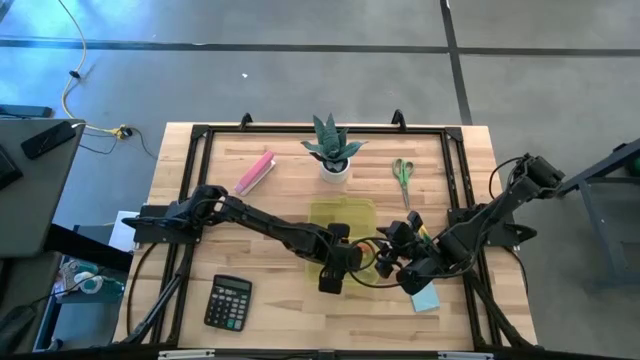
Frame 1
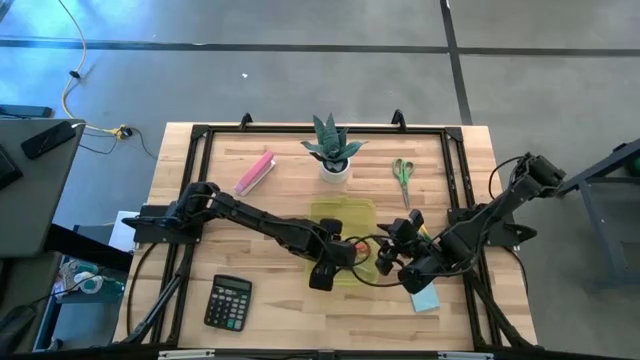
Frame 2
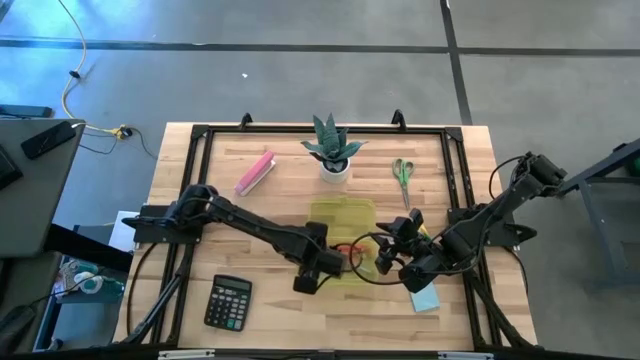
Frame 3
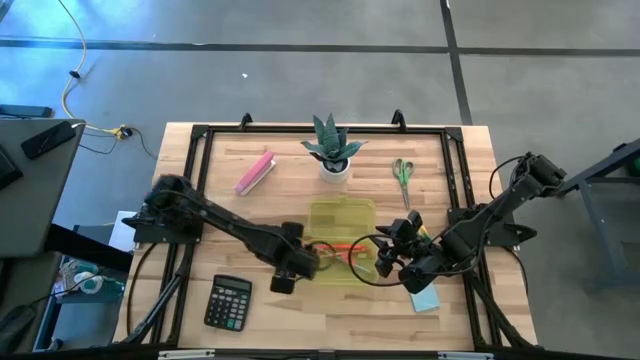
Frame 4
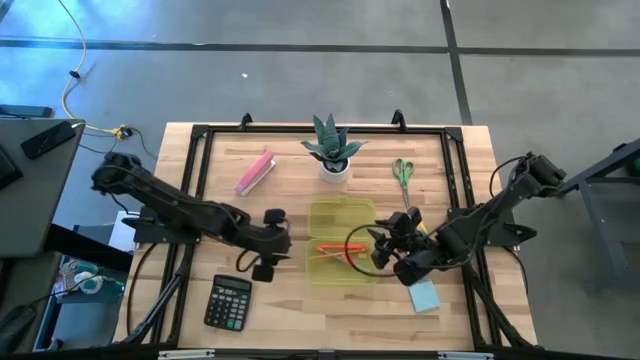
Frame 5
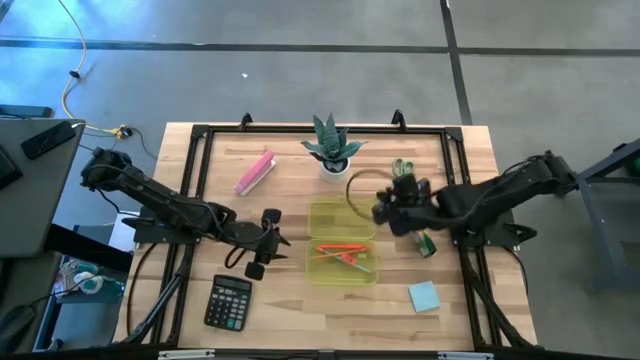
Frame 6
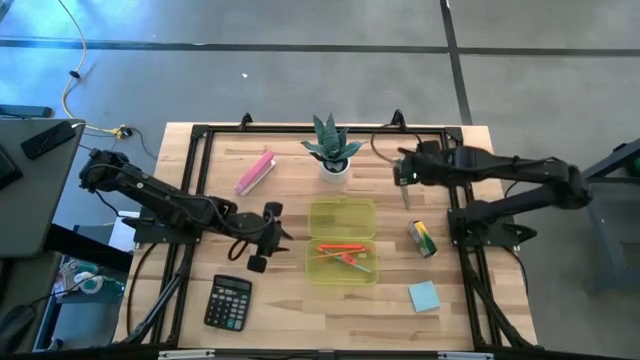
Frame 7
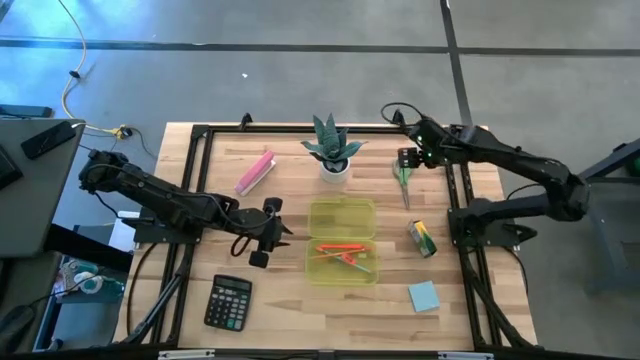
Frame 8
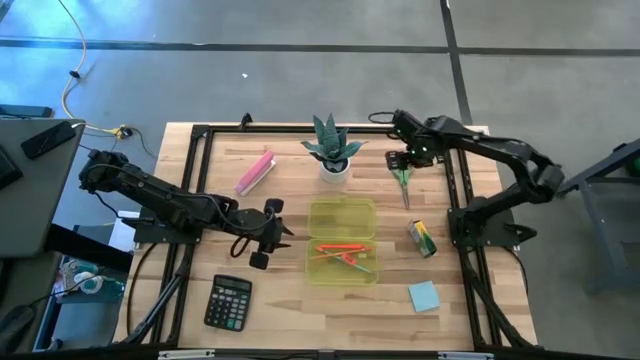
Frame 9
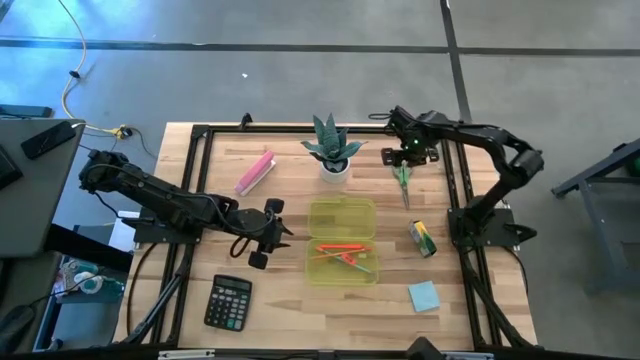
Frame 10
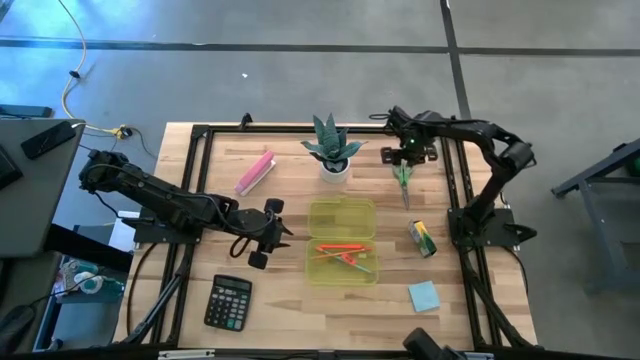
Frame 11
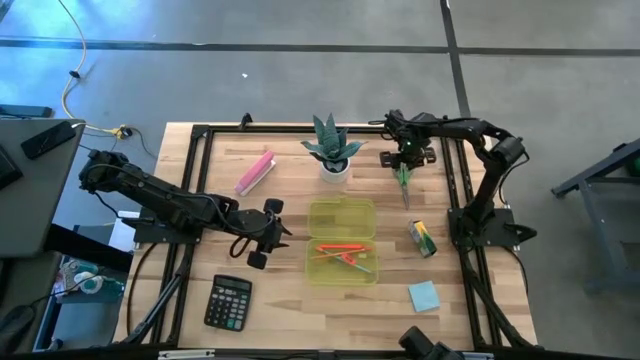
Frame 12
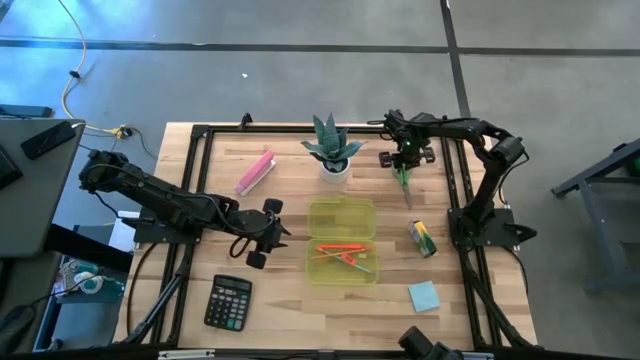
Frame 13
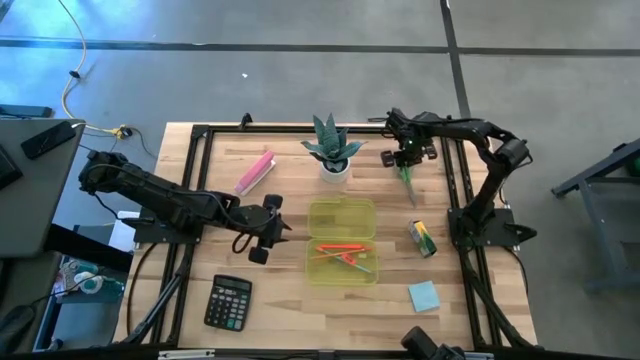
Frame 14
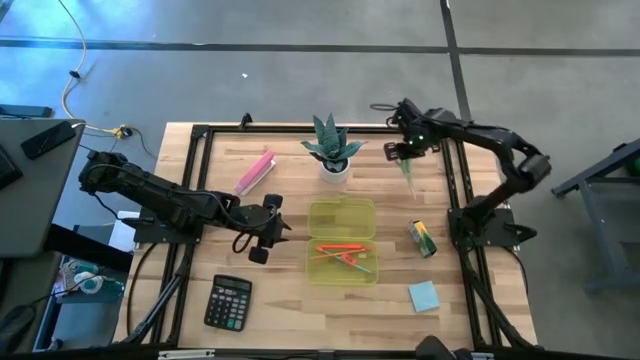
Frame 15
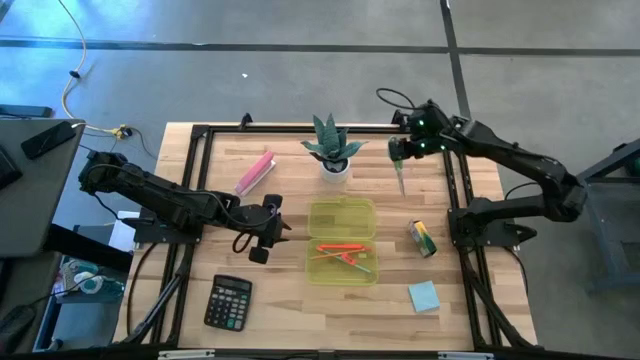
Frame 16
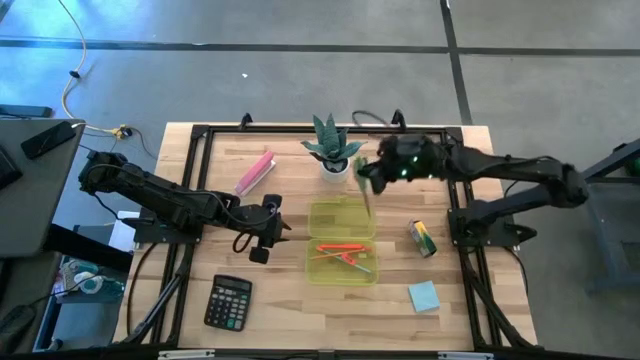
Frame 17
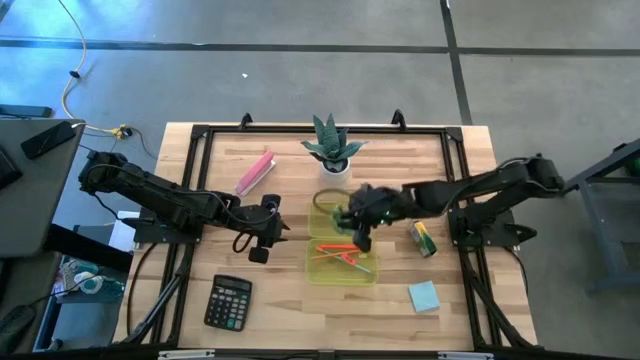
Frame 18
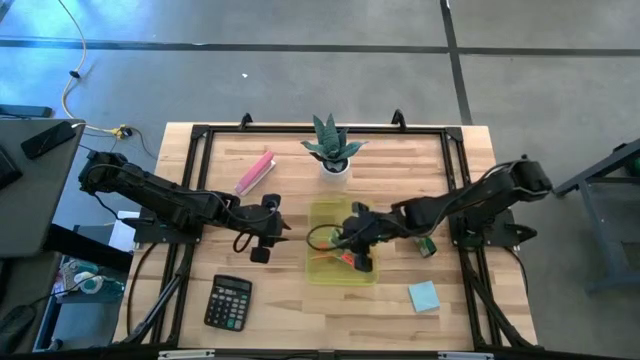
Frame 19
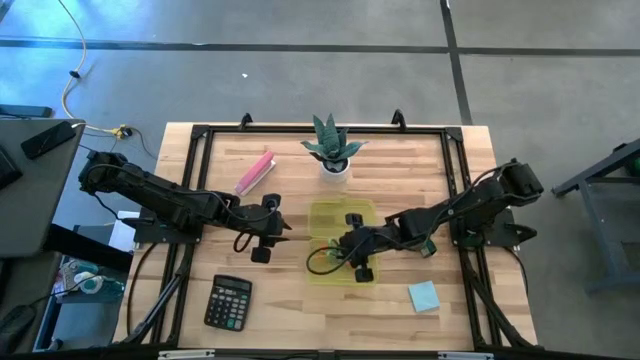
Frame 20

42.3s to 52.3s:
Task: Pack school essentials
Put the green scissors into the supply box

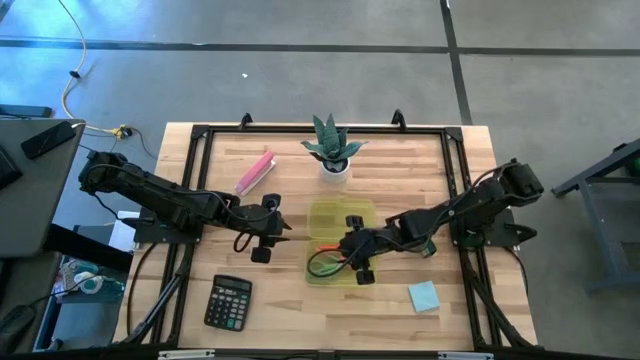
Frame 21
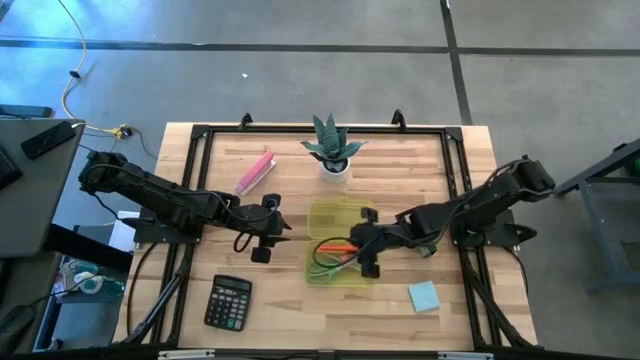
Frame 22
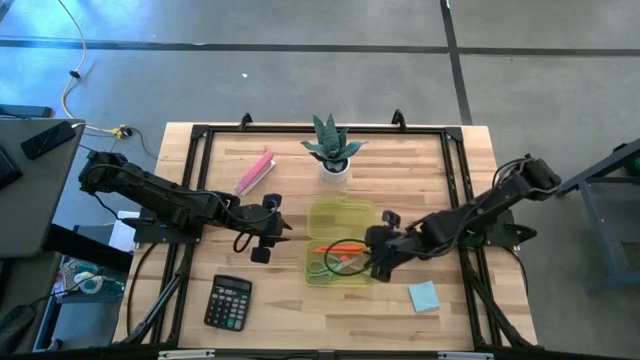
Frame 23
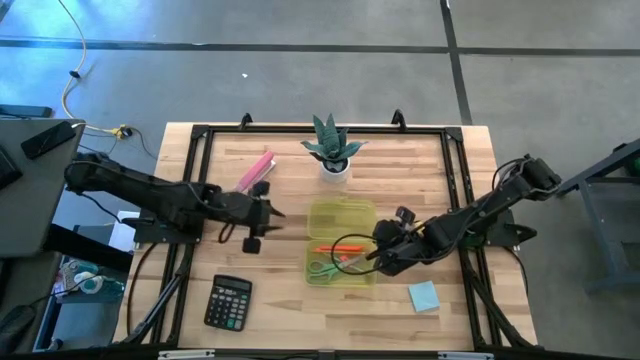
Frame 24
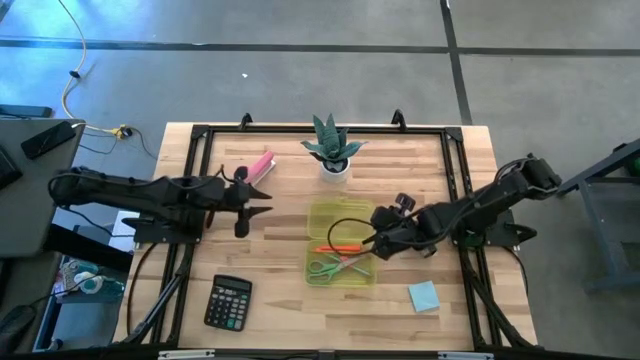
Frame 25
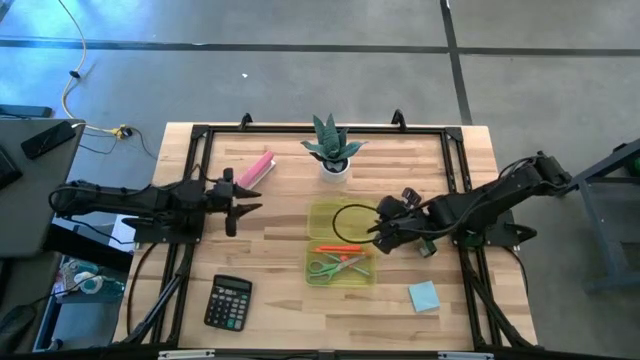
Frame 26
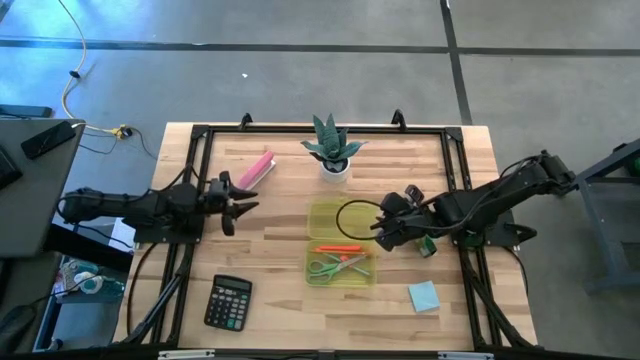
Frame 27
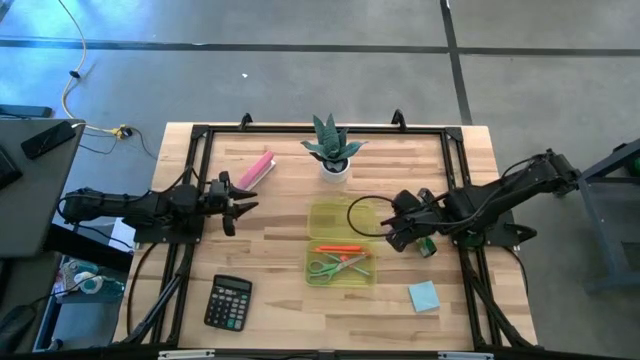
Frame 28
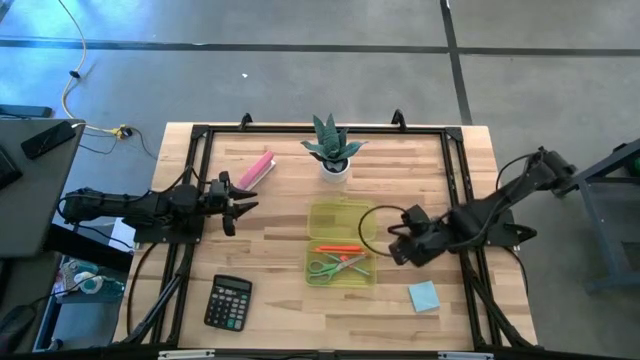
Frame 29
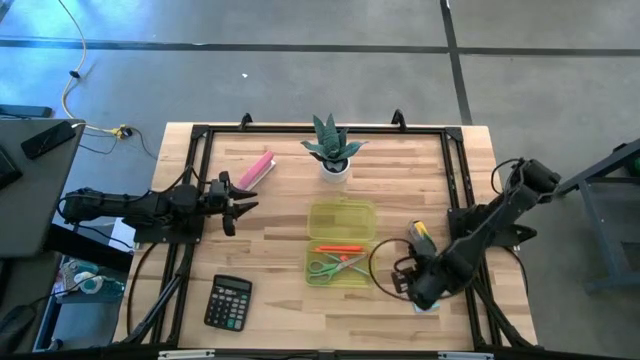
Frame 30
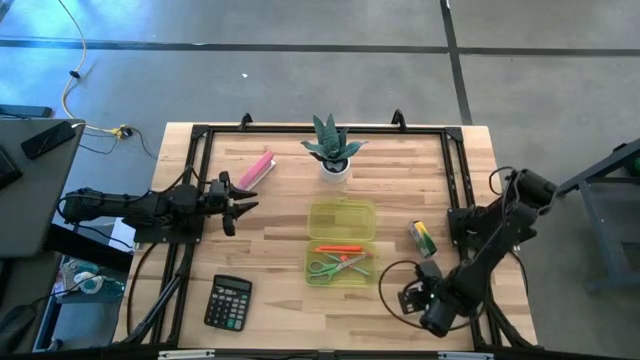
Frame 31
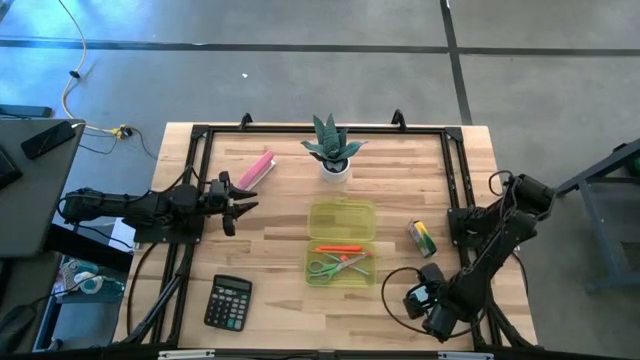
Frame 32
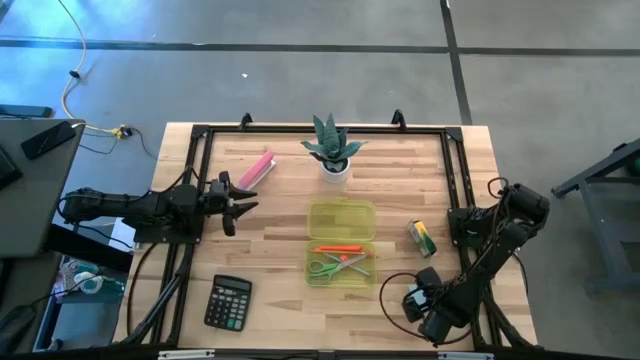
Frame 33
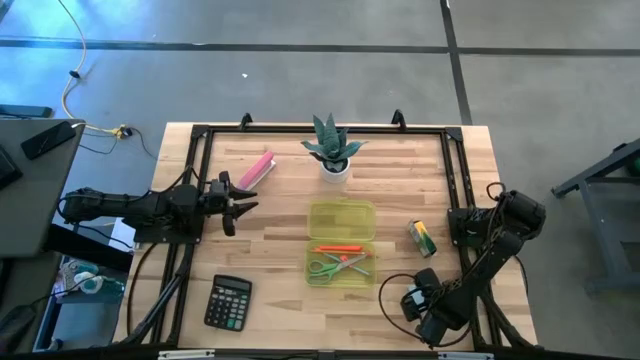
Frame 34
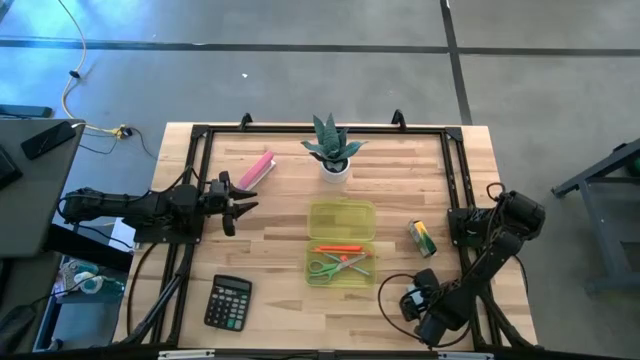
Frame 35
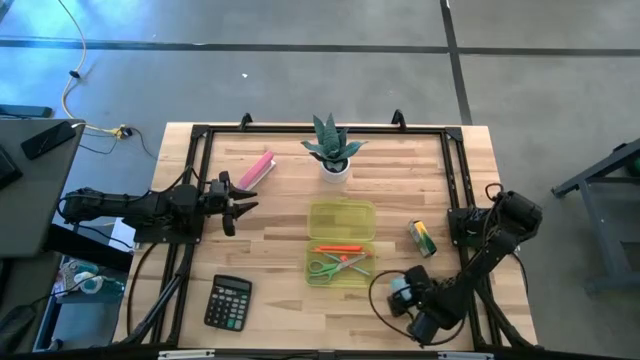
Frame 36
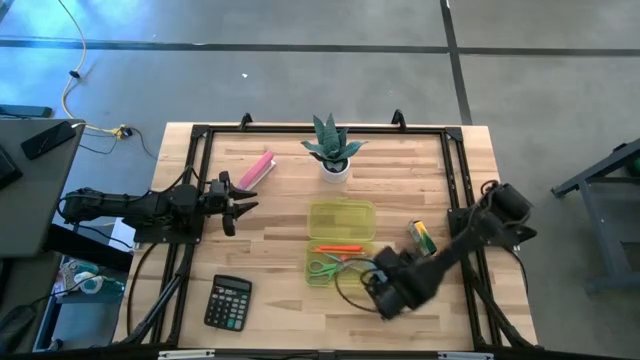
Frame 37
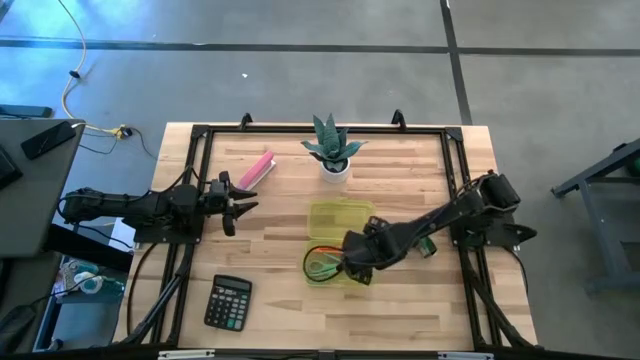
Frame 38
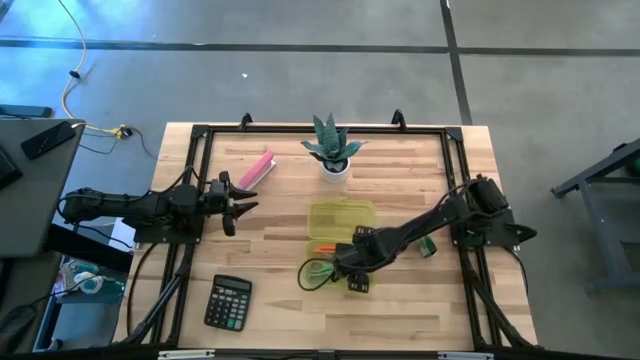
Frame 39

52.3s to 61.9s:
Put the blue sticky note into the supply box
